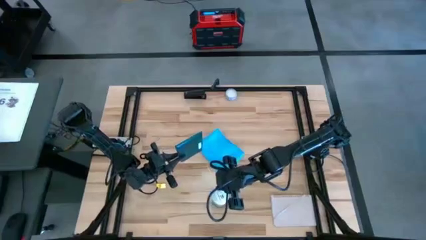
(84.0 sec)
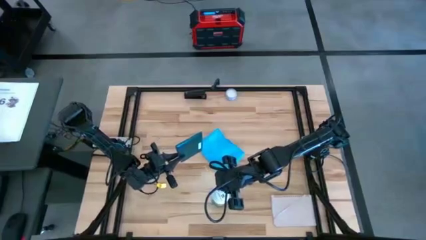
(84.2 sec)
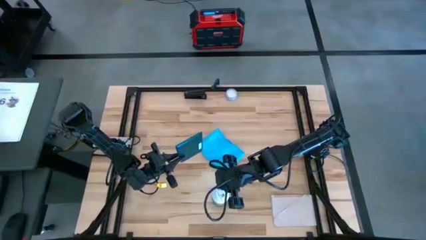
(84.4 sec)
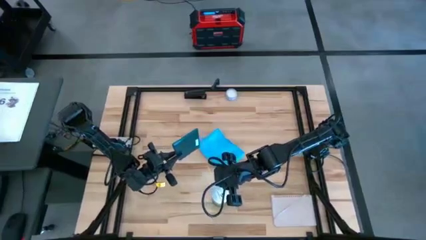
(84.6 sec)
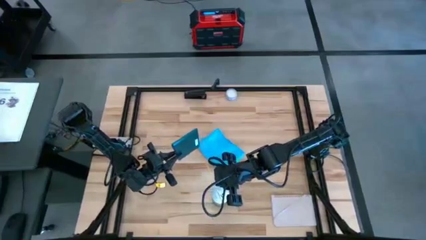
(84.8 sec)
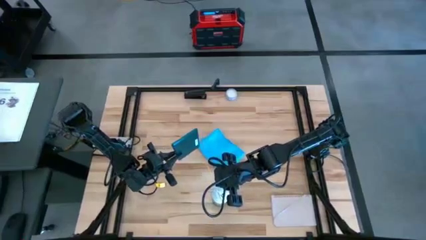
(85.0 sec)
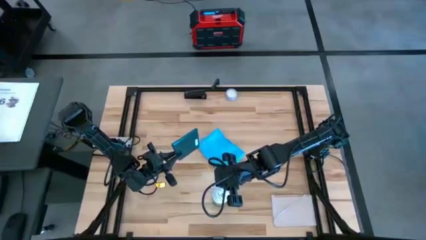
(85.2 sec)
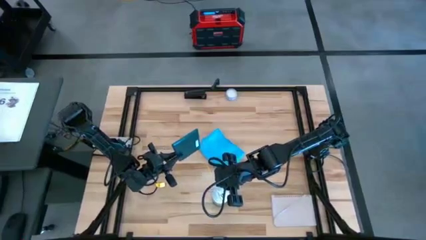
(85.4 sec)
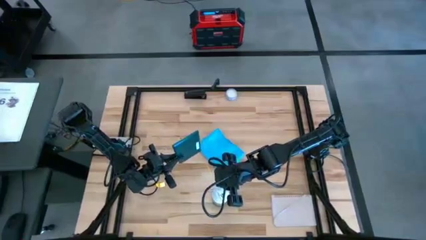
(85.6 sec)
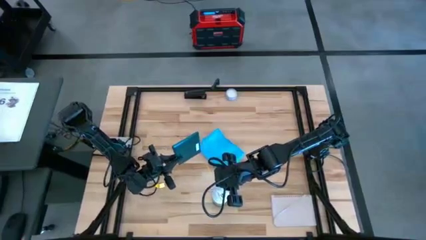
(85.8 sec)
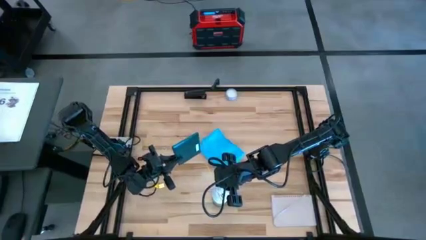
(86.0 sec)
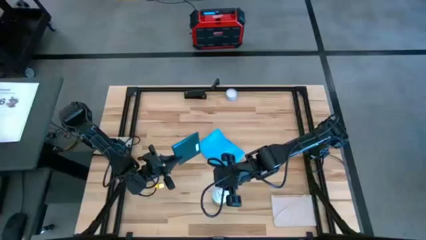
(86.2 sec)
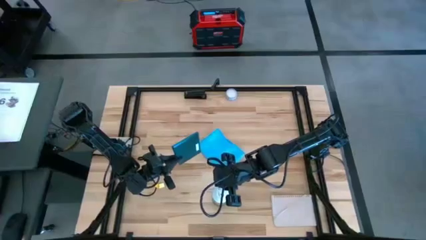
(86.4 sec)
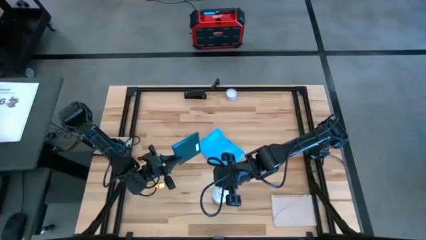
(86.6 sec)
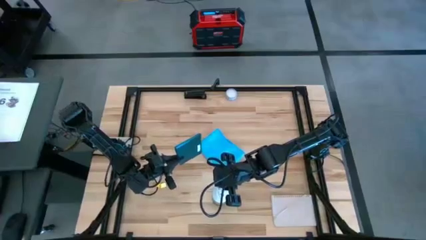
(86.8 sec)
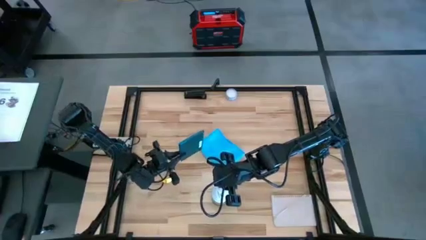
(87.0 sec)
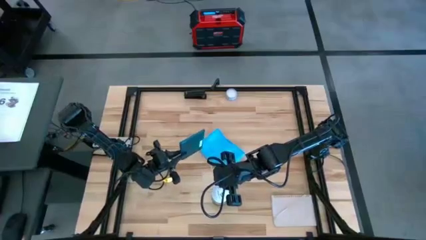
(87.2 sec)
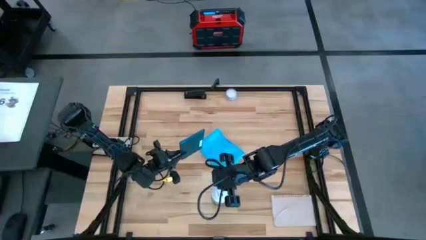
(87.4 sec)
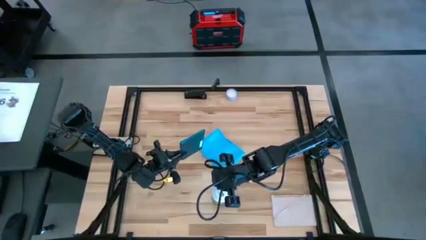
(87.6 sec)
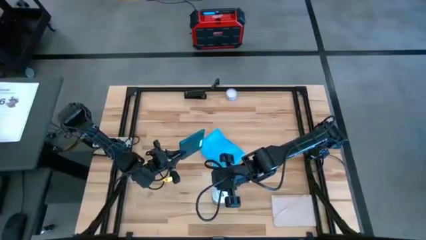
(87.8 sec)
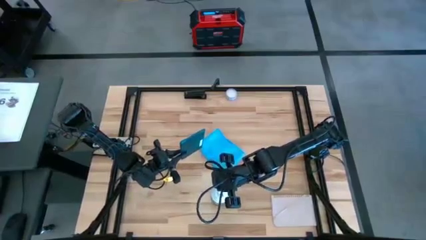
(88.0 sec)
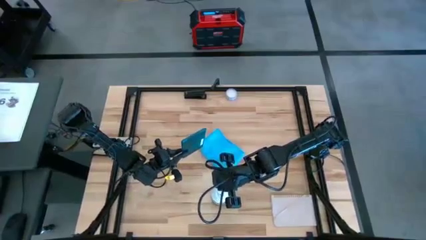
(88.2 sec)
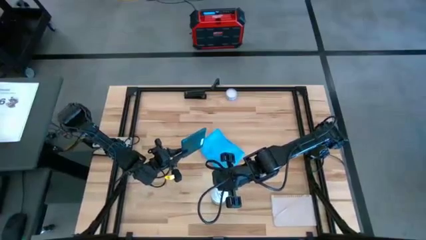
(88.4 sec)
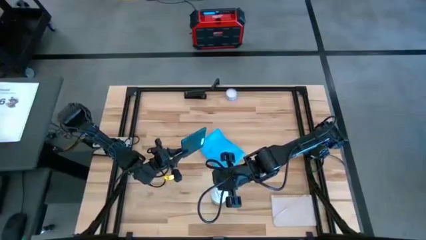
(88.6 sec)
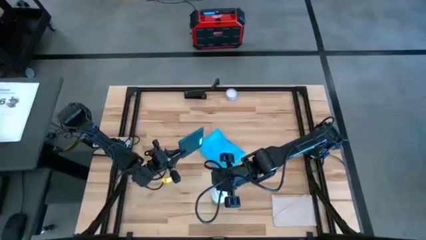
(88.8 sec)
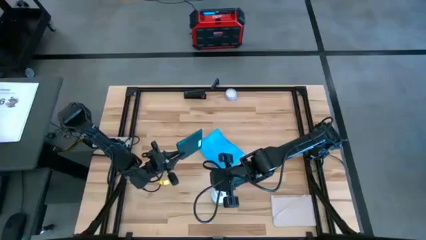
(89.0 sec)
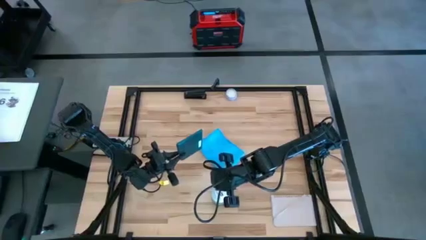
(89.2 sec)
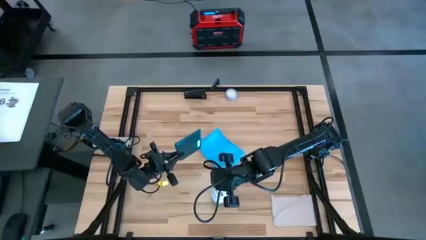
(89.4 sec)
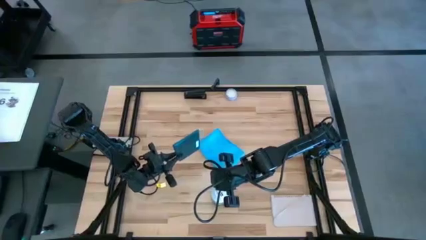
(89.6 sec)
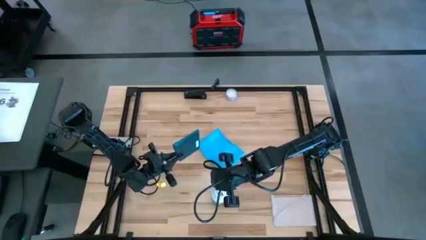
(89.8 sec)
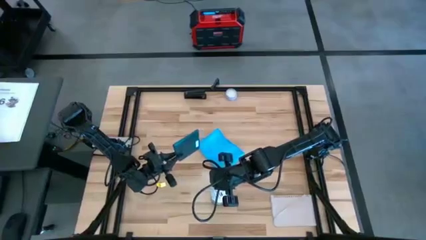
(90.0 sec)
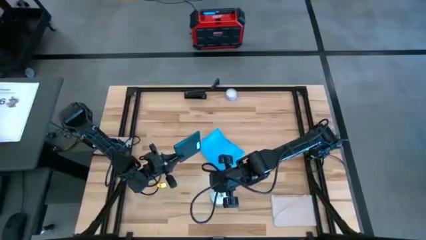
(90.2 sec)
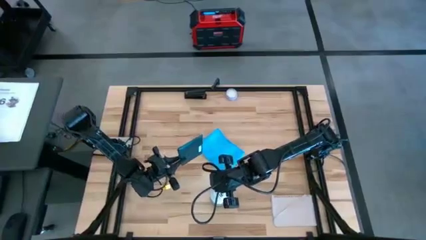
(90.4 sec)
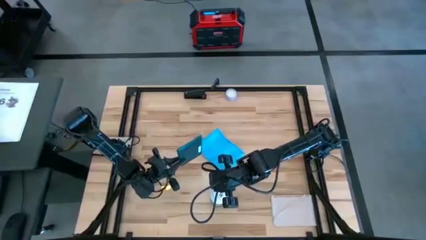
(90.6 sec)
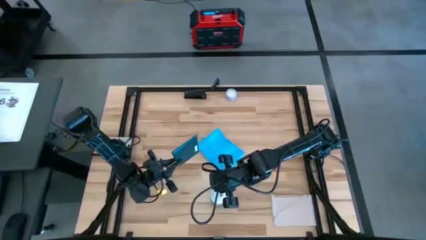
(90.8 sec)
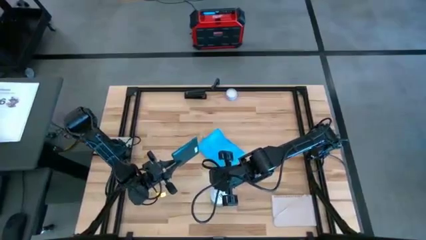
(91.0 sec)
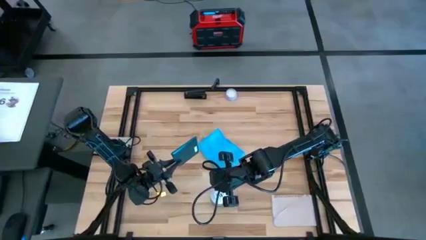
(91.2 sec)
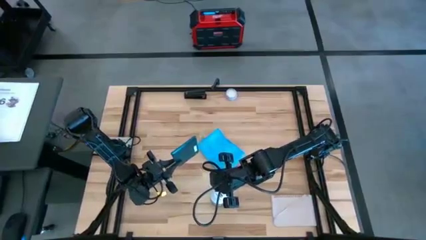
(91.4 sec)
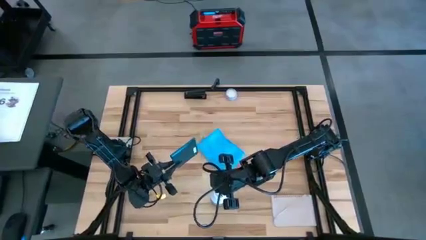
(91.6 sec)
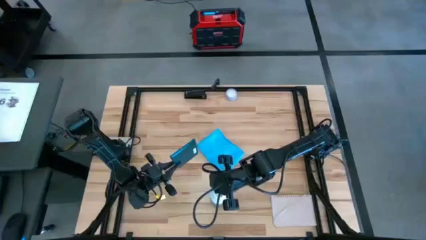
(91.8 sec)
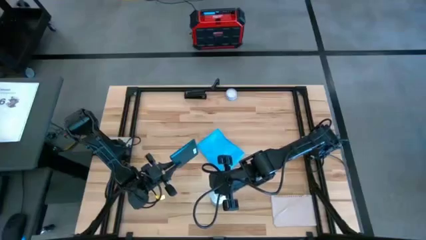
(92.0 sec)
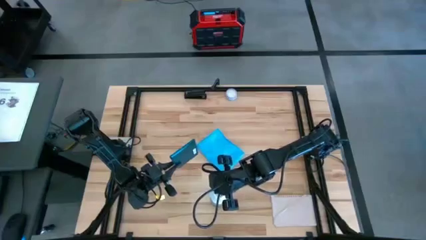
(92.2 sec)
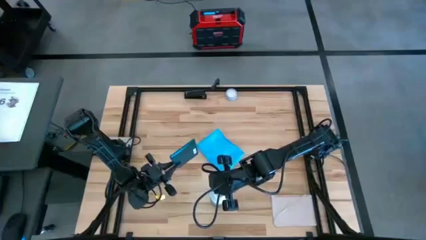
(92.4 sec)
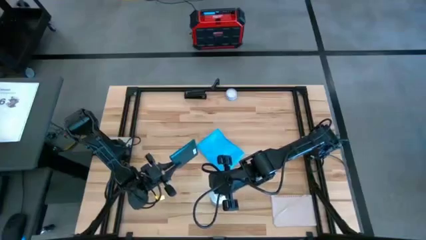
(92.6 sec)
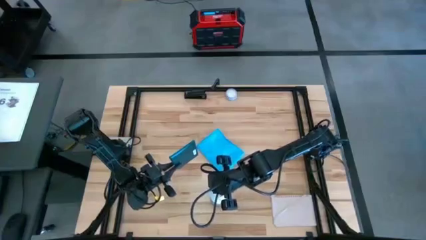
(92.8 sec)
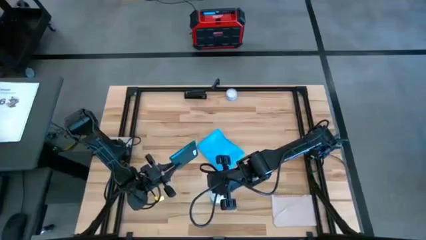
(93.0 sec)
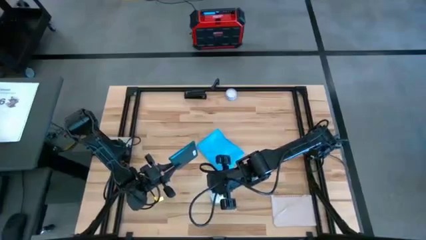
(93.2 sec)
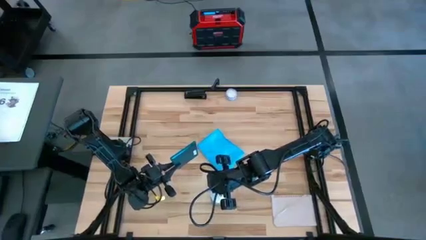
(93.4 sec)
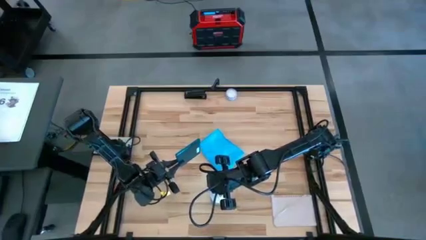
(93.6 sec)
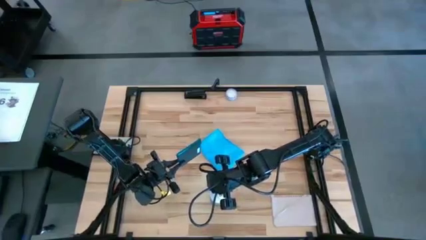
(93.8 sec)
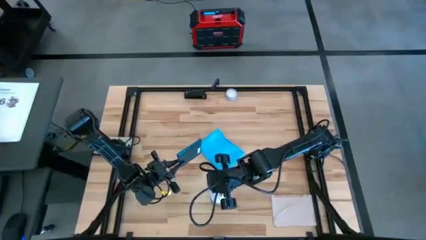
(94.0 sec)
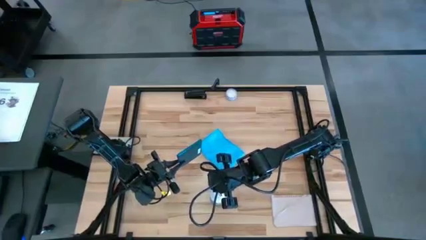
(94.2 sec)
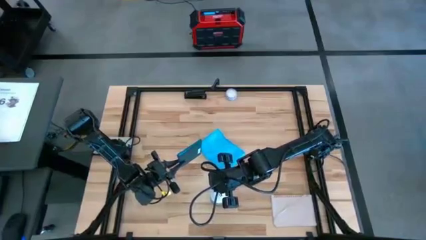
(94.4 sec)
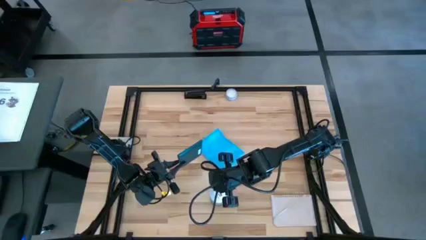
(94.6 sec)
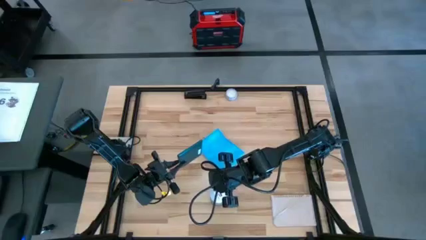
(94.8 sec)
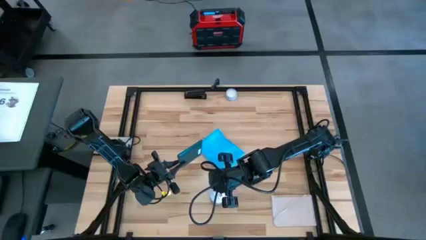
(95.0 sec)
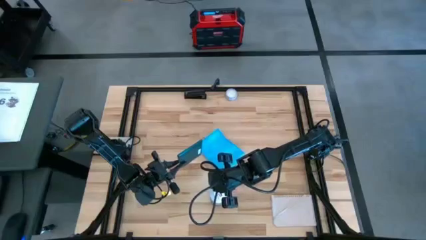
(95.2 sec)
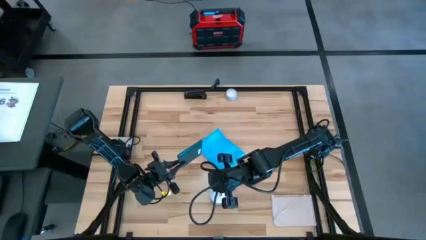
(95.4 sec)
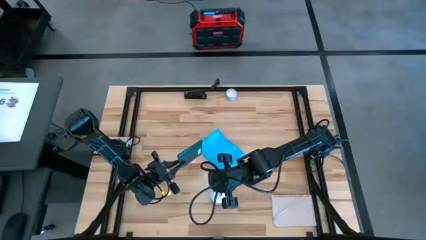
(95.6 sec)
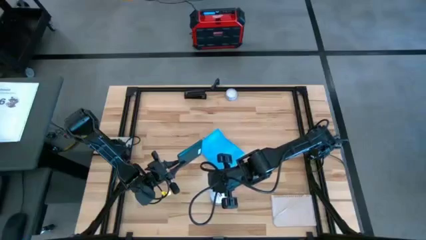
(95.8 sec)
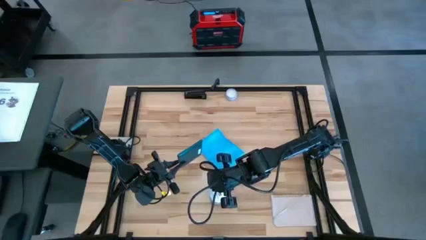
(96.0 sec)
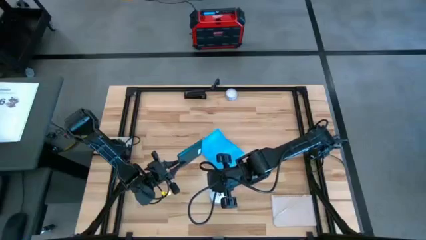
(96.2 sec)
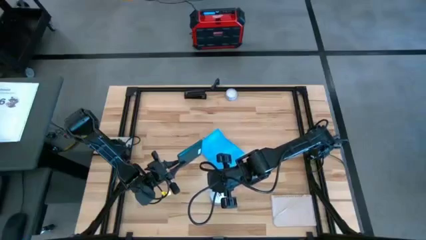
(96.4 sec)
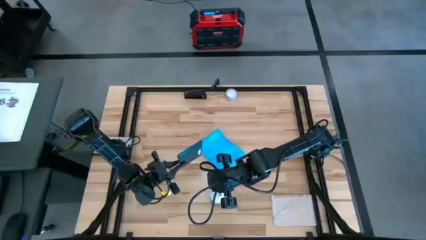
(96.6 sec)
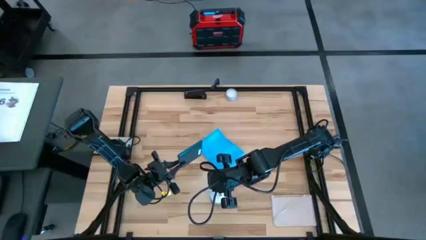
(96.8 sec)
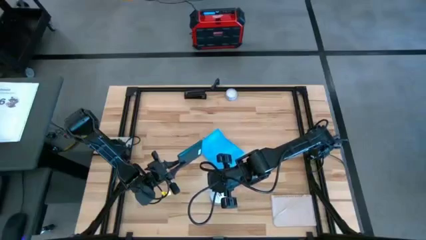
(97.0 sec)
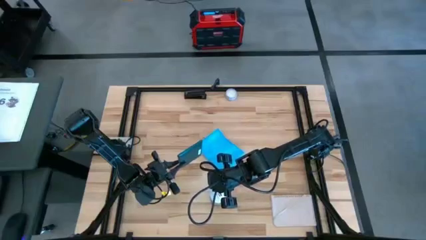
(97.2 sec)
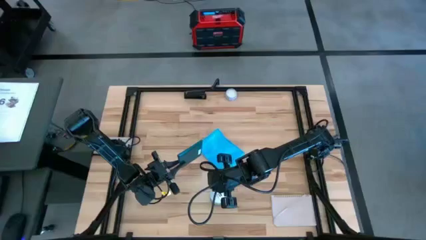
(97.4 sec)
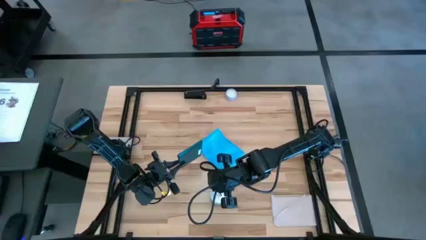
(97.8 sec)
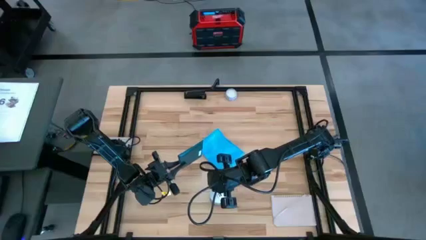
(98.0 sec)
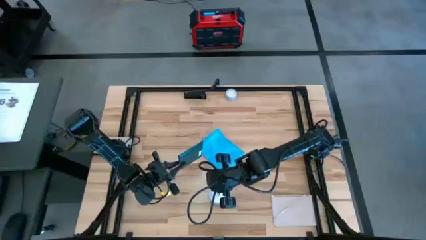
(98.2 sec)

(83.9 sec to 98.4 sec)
Task: Apply microfiber cloth
Spray the back of the black tablet using the spray can
